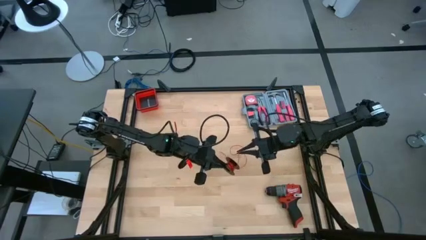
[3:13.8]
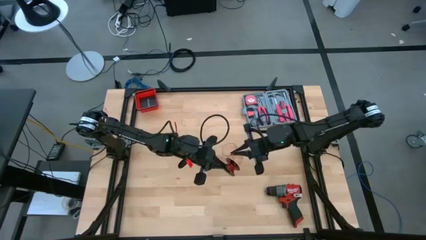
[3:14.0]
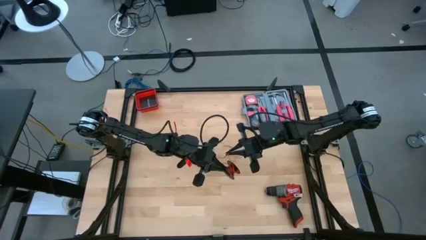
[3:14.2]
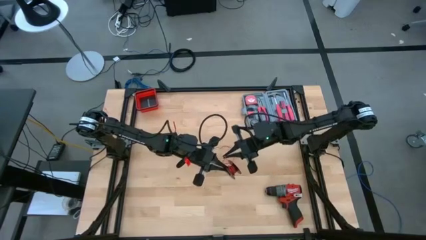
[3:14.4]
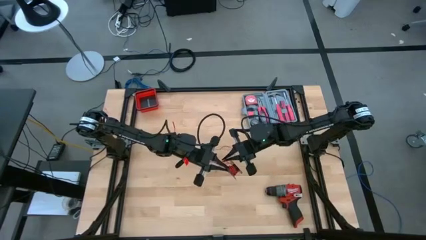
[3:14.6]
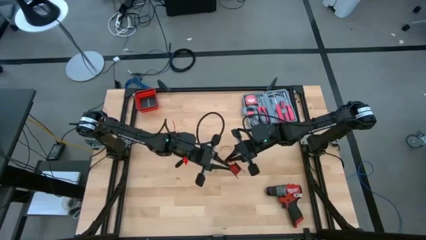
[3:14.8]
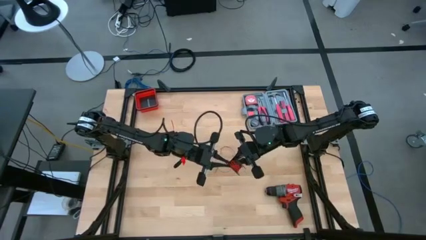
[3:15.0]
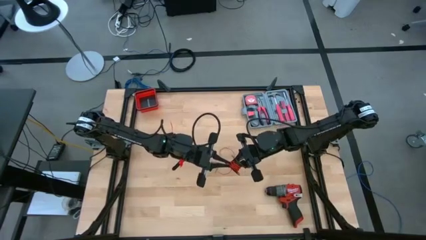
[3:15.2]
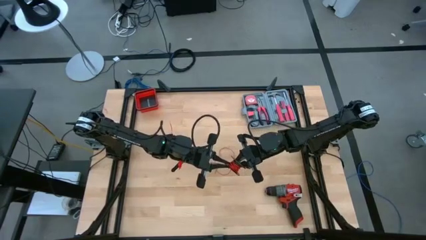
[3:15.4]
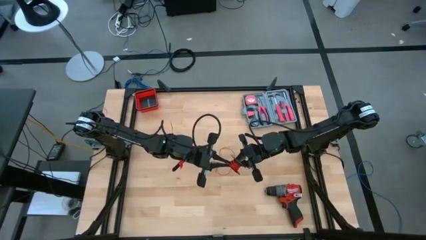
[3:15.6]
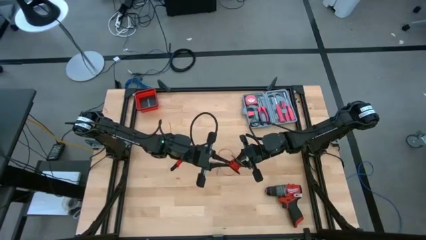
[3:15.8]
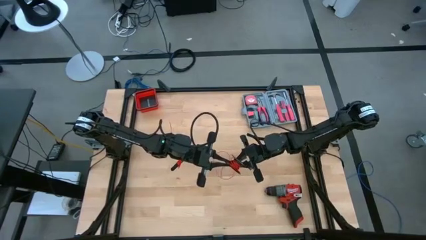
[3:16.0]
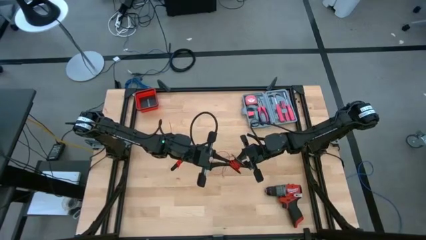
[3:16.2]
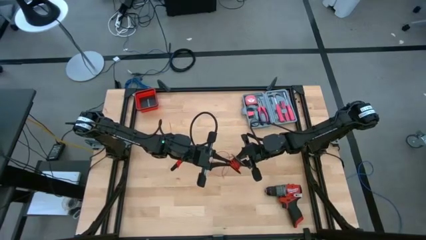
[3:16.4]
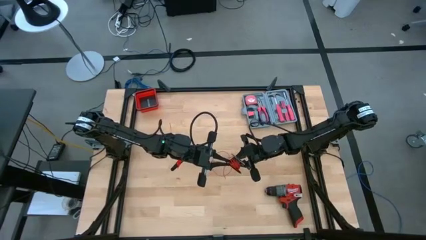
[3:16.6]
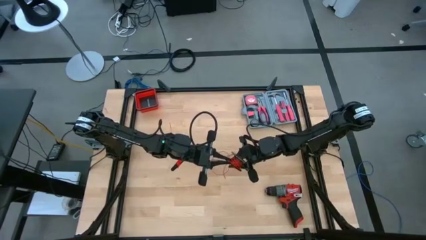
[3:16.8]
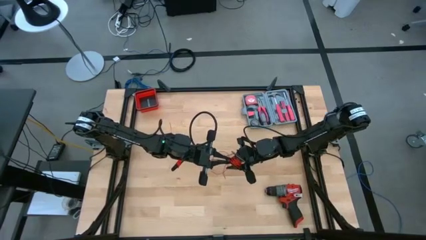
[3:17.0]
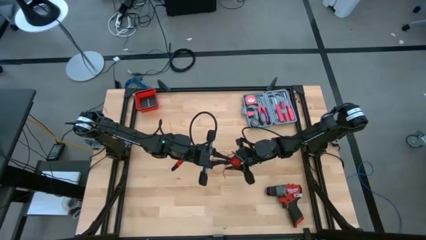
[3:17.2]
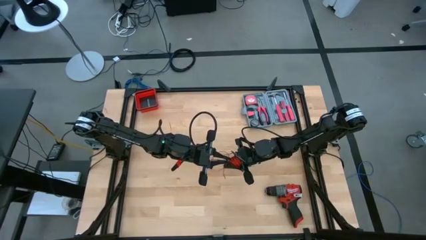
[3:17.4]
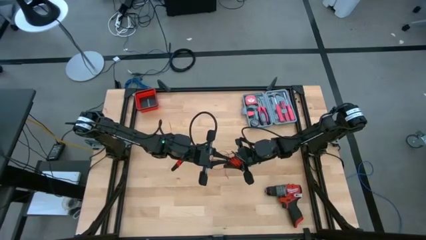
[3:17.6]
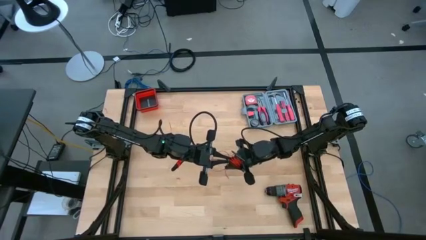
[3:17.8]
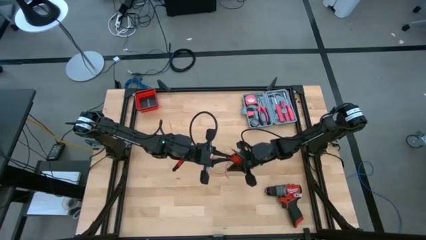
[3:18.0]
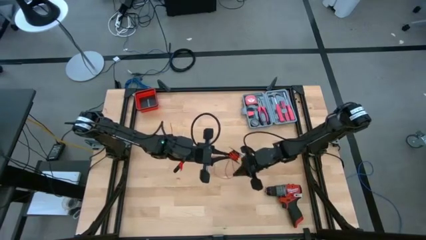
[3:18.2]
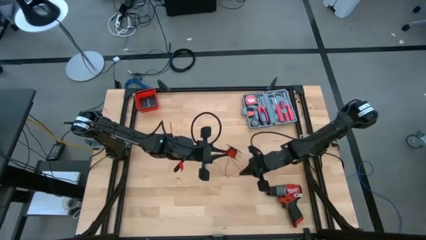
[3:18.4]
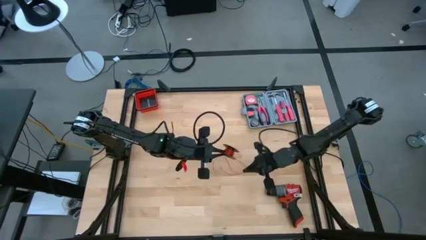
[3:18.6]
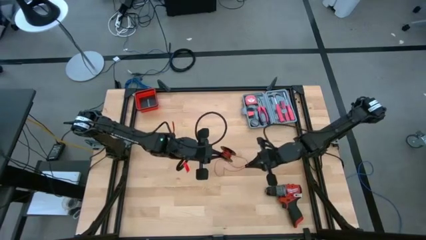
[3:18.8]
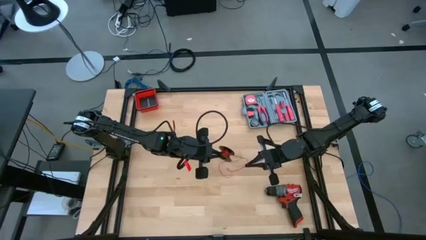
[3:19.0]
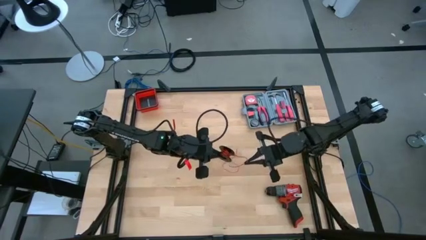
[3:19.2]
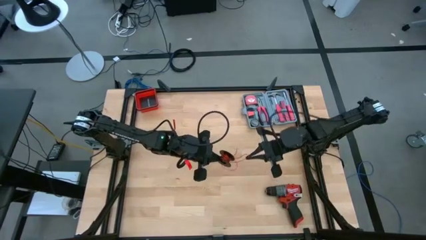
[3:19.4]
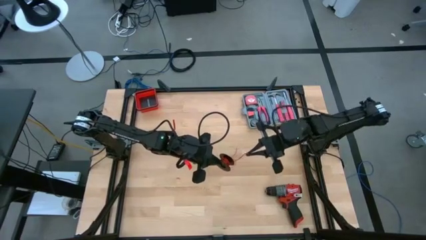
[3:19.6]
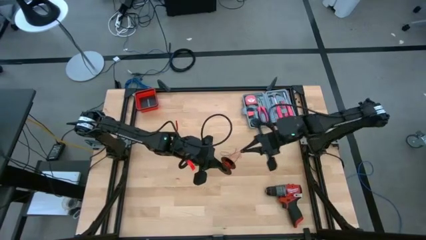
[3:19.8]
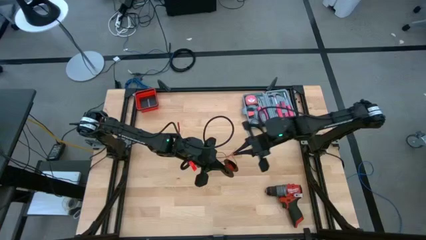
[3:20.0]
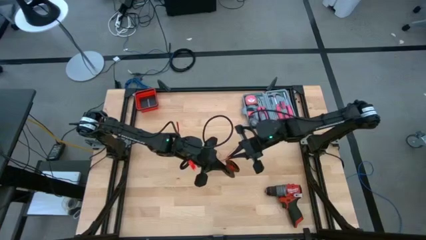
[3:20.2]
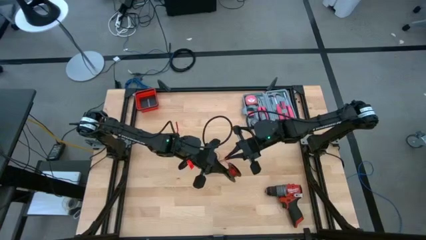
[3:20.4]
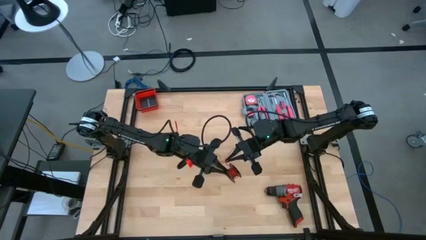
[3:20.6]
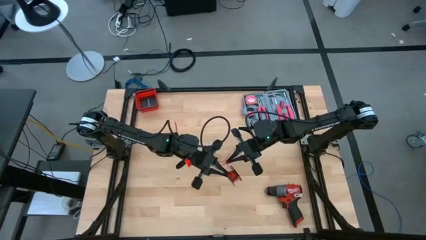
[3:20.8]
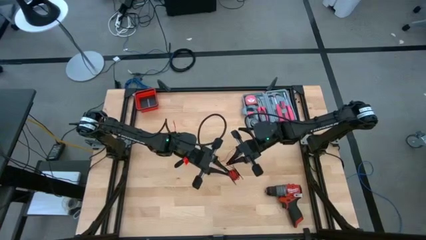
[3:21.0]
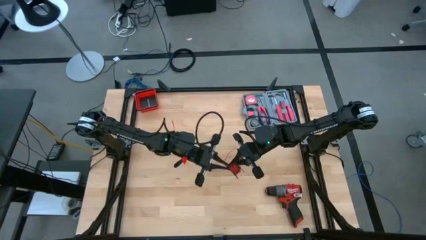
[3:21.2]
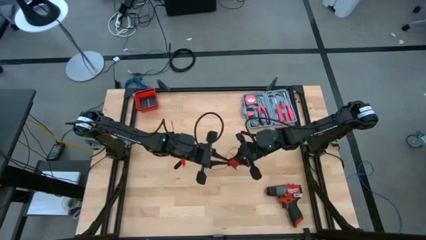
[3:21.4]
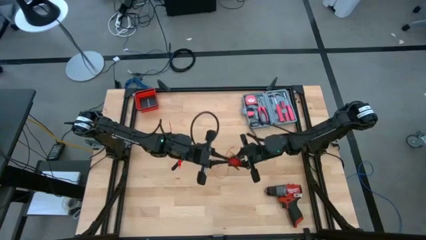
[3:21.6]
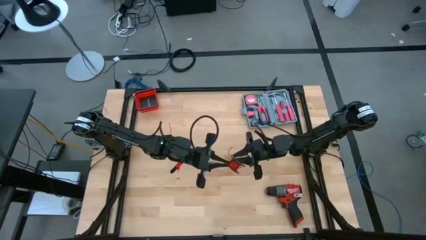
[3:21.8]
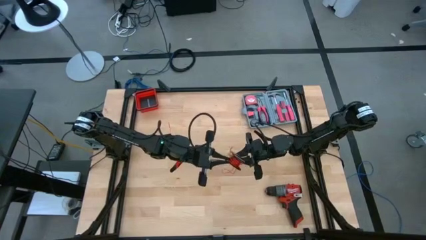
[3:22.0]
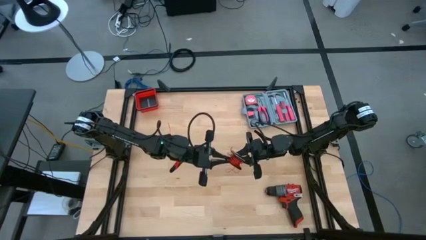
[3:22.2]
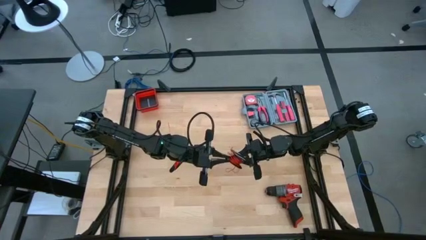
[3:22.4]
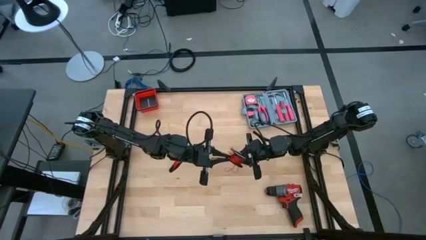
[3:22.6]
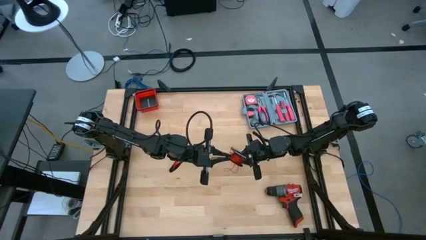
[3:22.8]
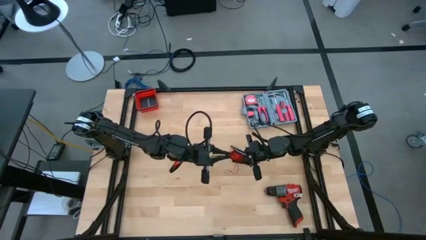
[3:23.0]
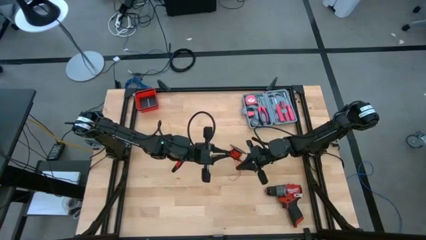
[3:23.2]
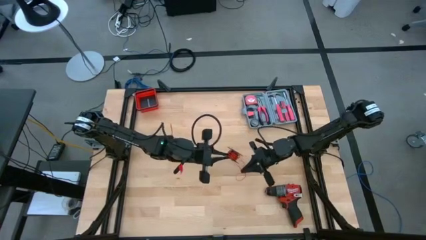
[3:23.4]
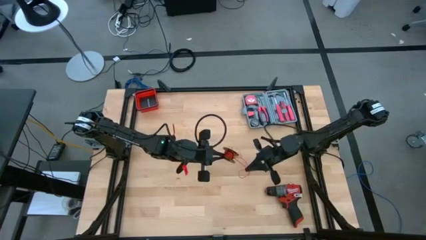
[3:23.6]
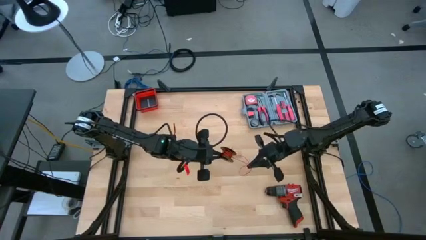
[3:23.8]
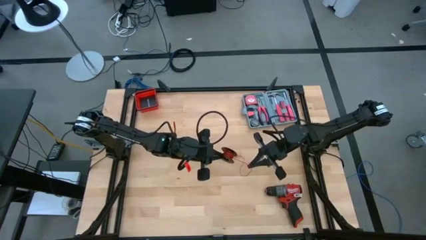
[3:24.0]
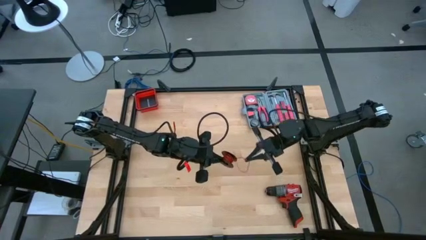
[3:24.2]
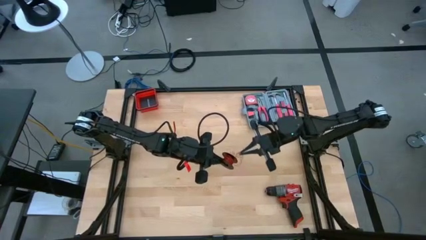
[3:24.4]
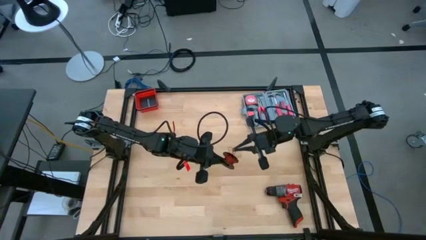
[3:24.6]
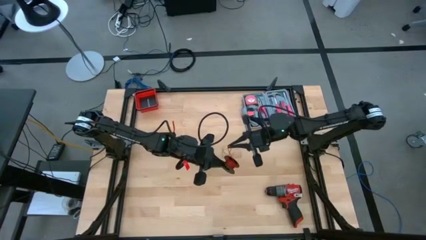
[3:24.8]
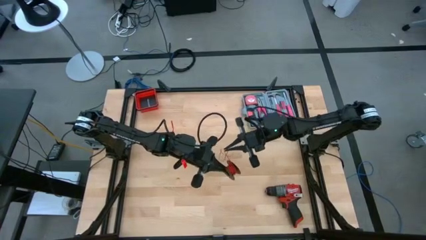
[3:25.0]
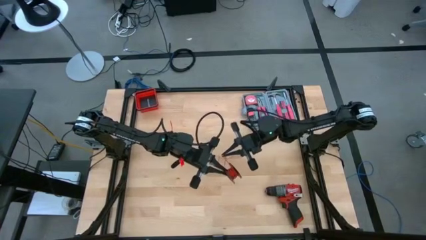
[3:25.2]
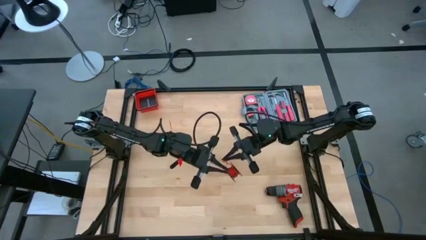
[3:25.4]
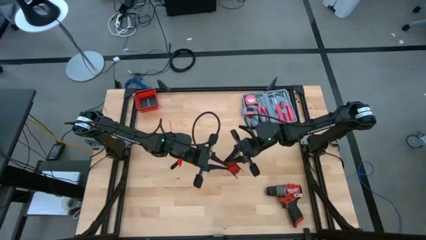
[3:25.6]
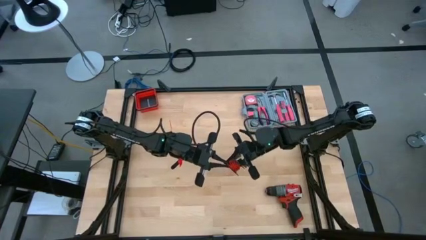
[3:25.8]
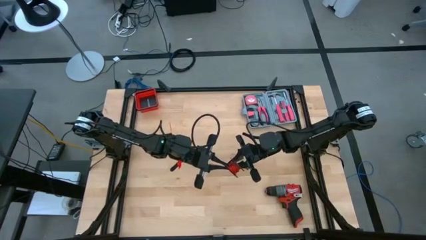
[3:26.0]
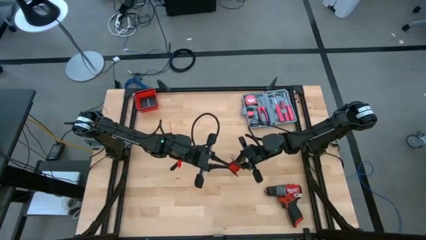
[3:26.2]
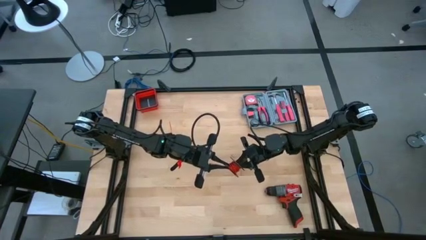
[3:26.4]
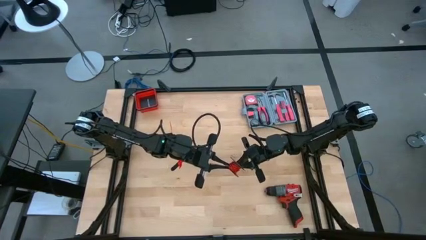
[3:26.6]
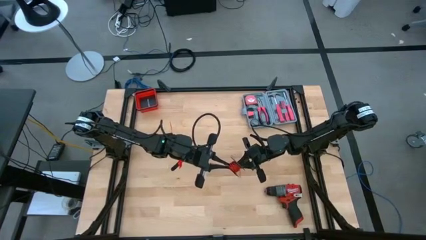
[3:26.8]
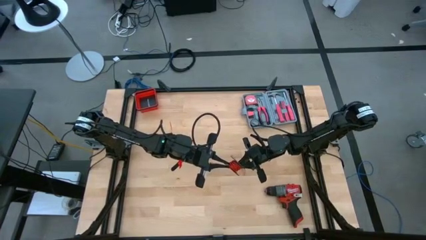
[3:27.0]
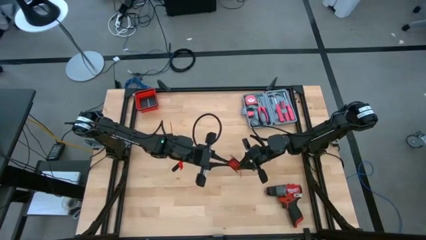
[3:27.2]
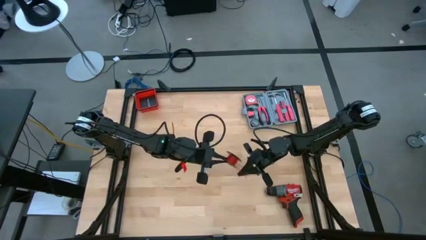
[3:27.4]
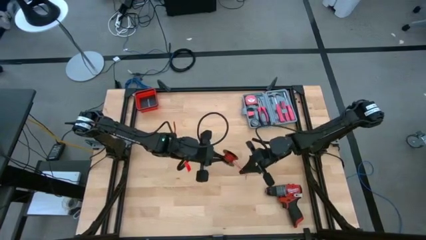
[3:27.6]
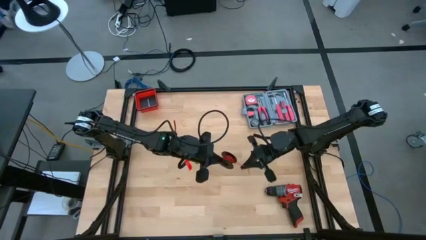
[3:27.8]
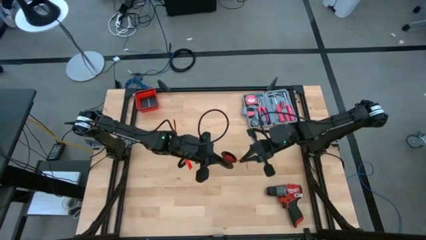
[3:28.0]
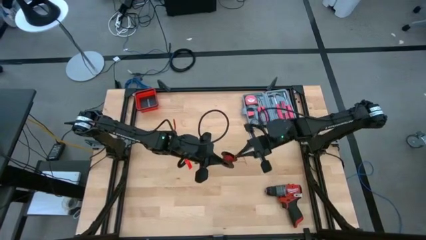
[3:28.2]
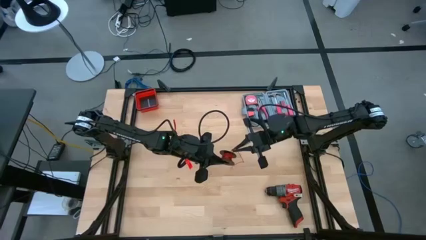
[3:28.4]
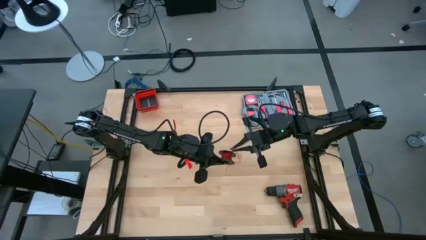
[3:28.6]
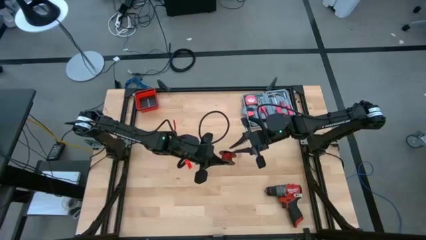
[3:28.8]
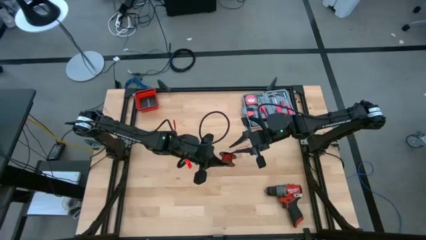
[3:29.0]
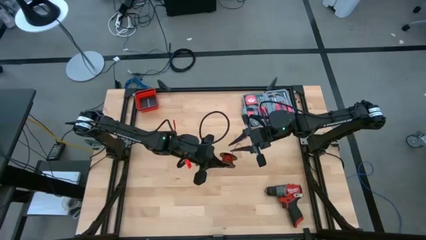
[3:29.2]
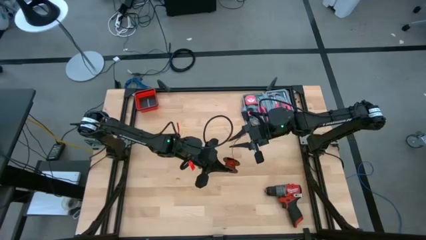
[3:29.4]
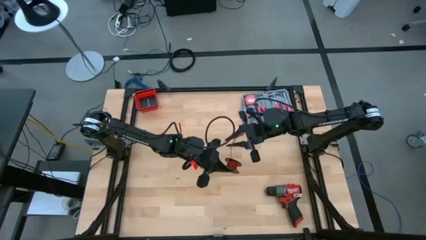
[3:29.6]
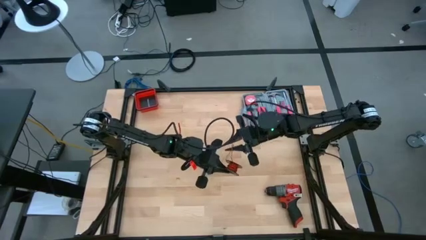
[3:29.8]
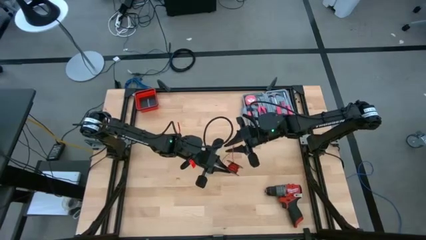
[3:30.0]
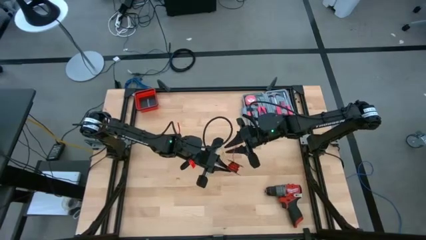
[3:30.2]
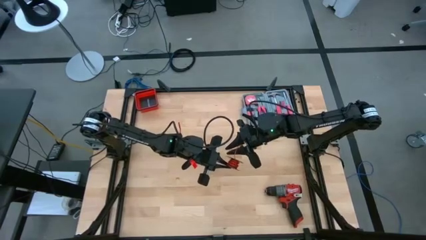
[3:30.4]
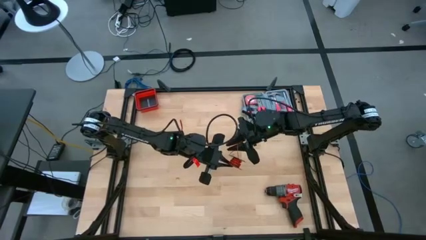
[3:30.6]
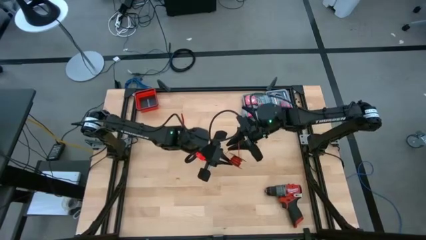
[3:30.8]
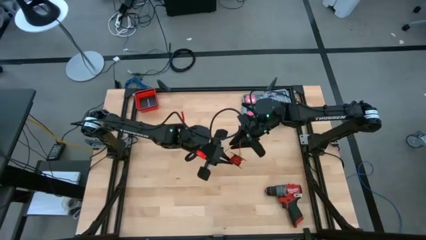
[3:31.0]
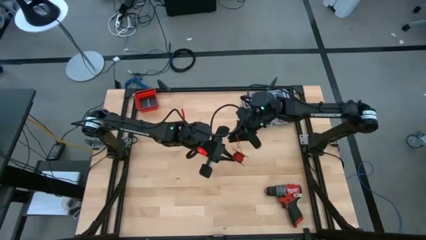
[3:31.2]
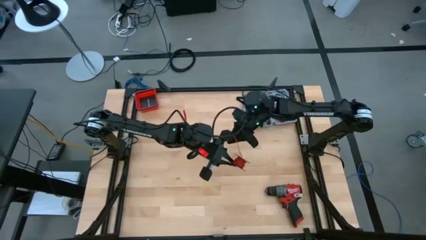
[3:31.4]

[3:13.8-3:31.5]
Task: Coil cords
Coil the red wire onto the black spool
